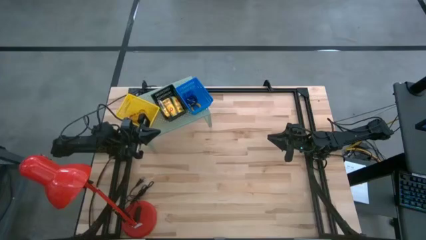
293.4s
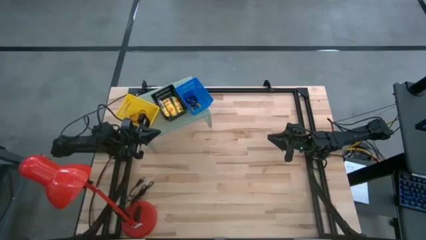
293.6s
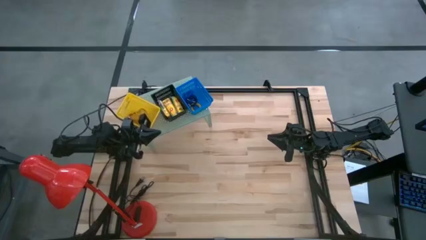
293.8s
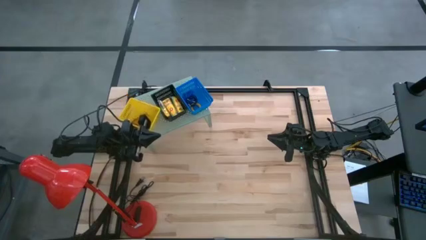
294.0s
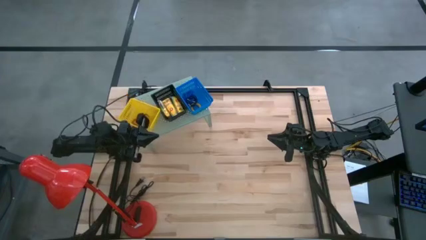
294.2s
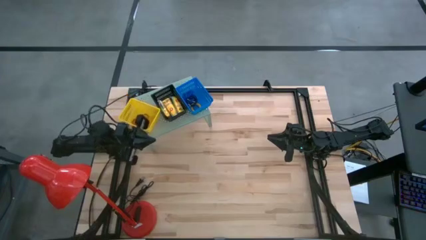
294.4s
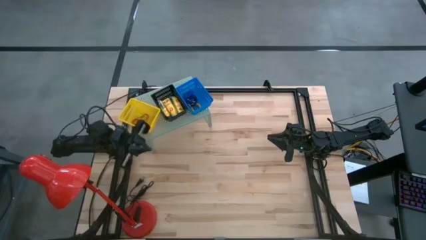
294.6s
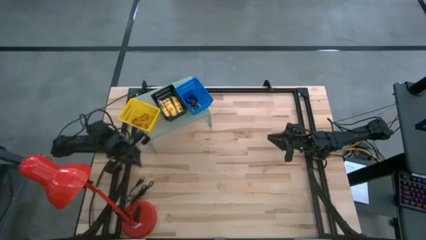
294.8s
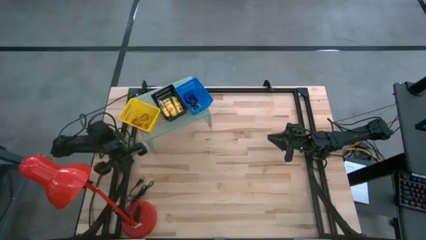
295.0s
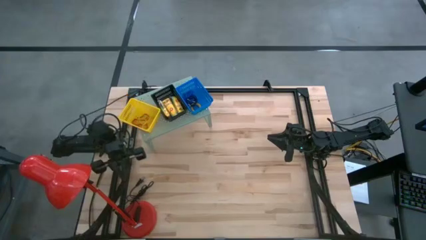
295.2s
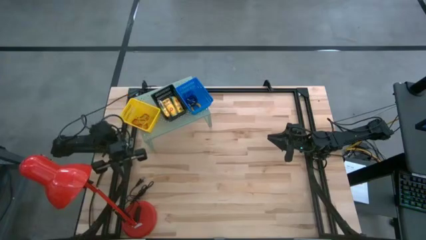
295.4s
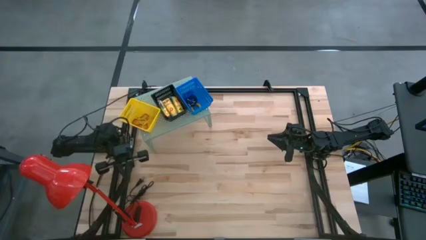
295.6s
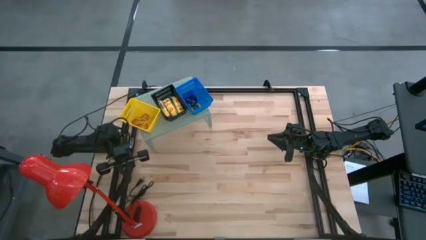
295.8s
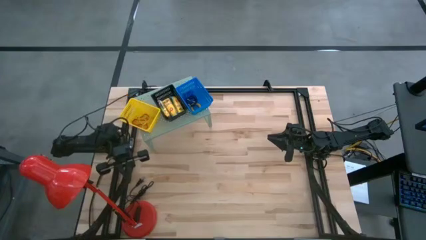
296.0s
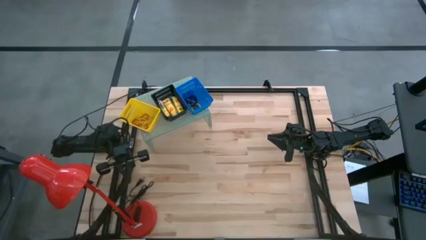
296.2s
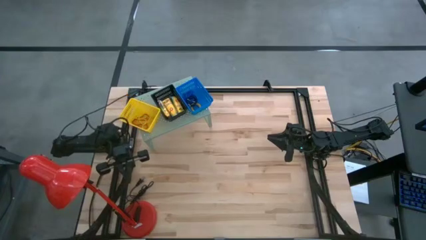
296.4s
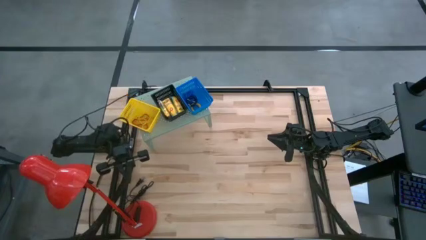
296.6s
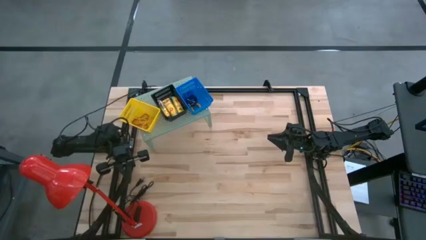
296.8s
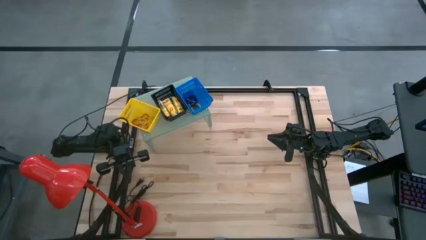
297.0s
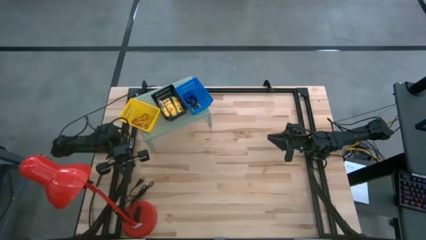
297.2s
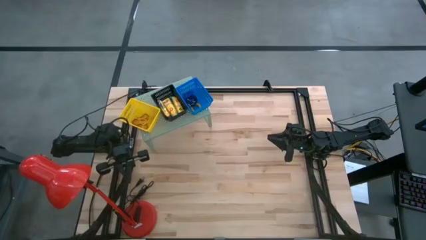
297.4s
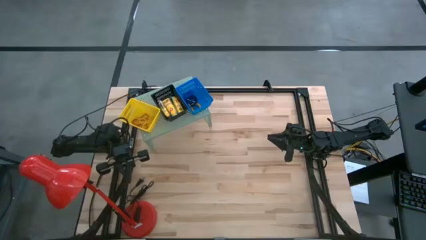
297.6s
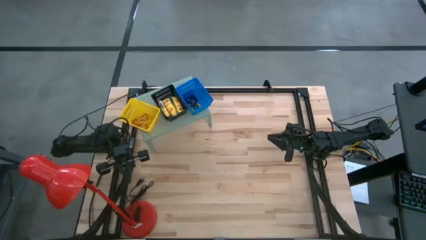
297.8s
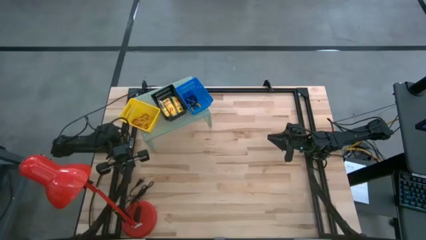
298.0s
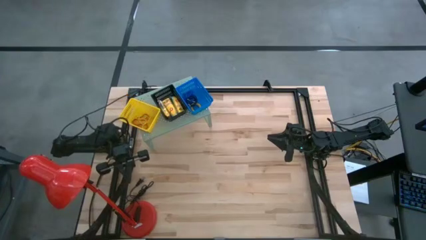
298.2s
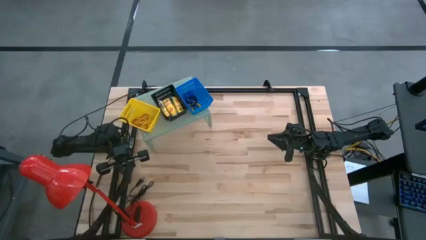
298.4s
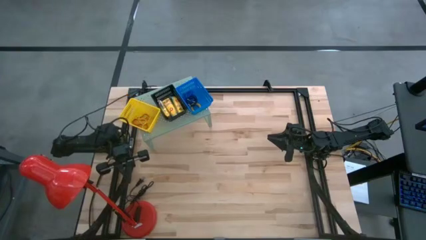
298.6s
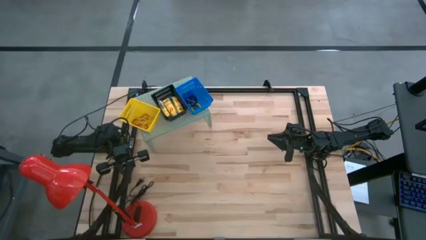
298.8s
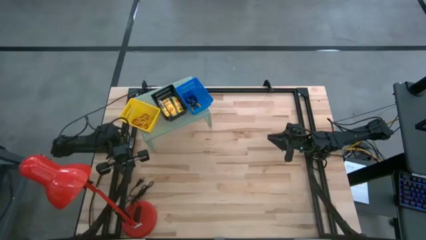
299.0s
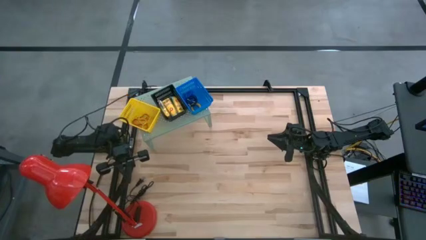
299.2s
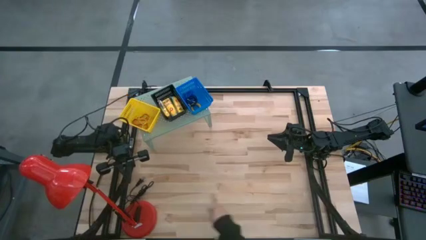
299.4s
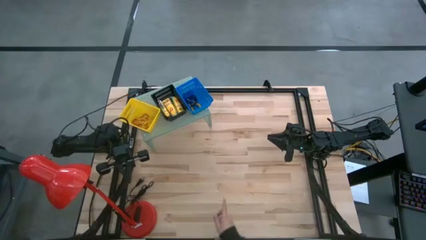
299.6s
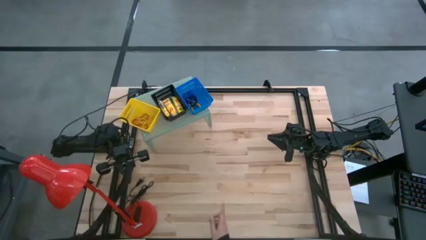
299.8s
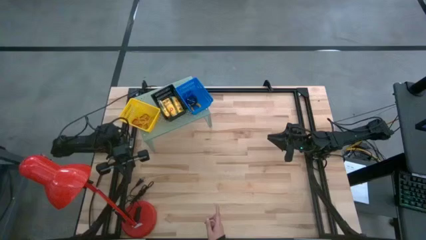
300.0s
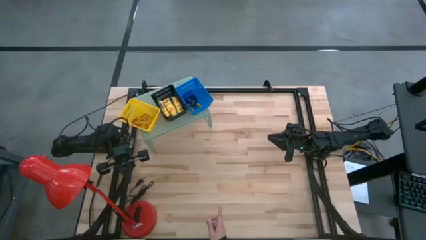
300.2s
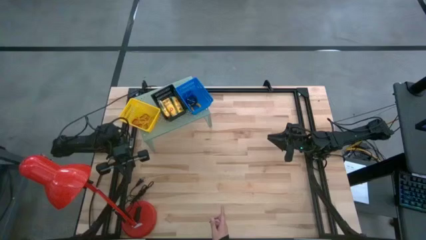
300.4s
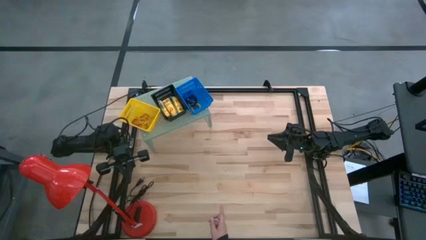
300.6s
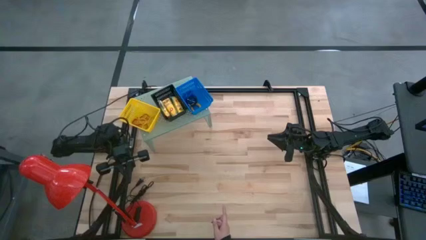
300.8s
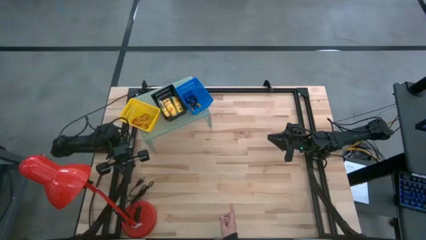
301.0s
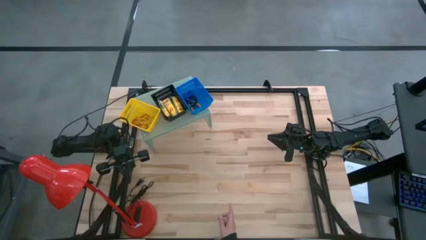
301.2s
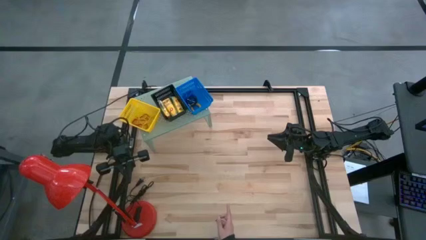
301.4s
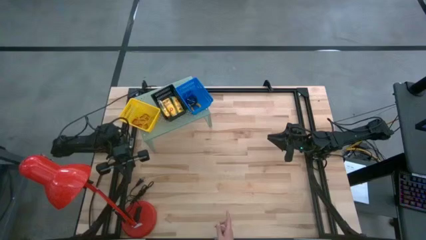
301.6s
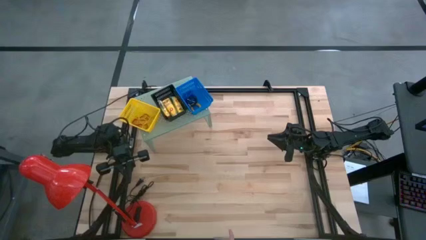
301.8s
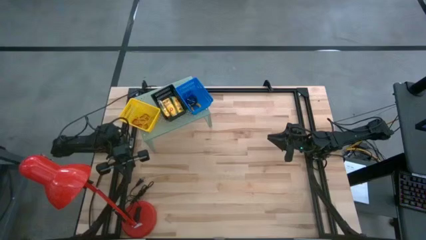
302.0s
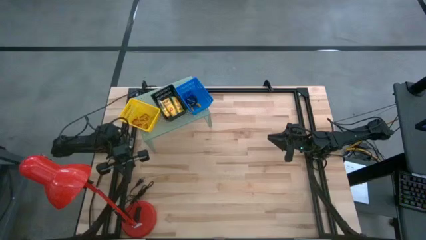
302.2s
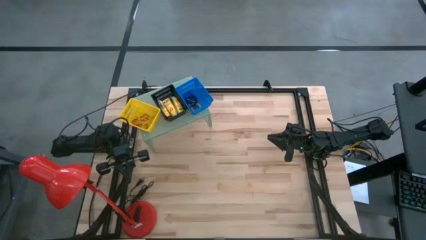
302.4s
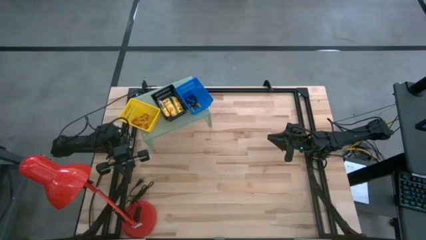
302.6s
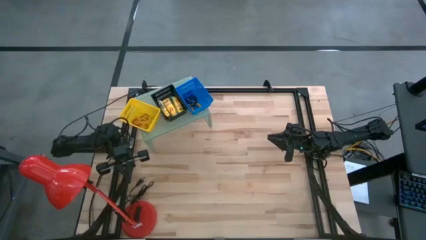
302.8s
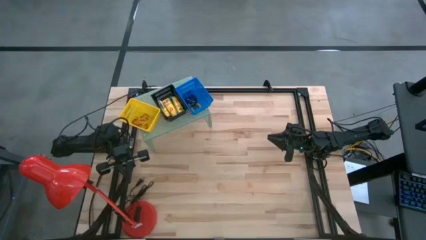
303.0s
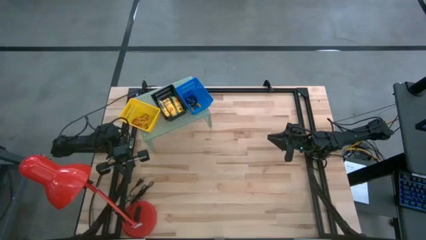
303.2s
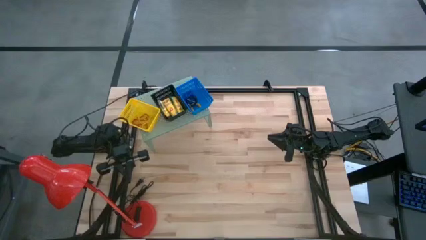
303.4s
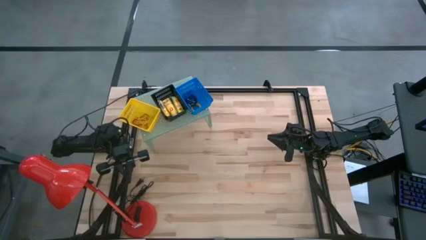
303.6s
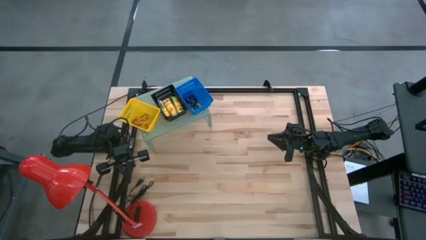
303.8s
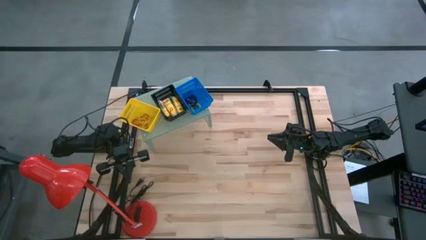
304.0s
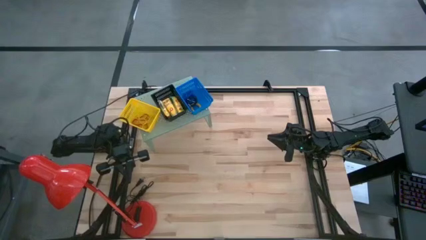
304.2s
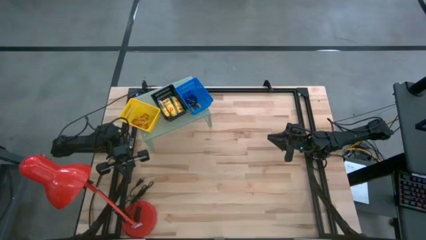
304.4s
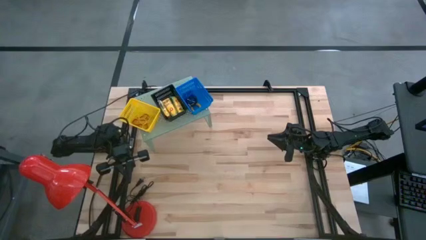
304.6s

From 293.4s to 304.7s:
Task: Pick & Place Office Desk Supplies
Return to Home Position

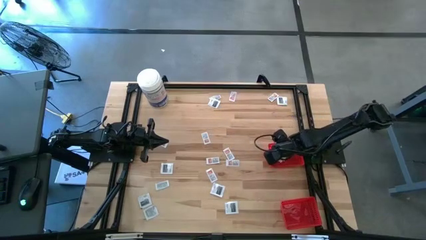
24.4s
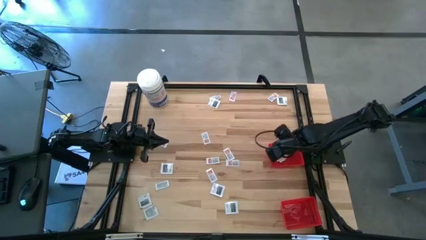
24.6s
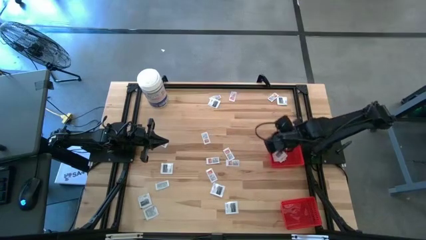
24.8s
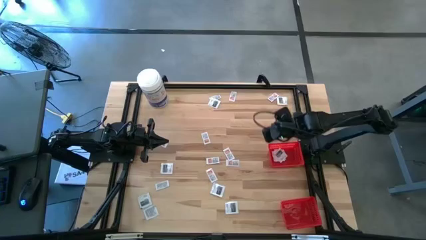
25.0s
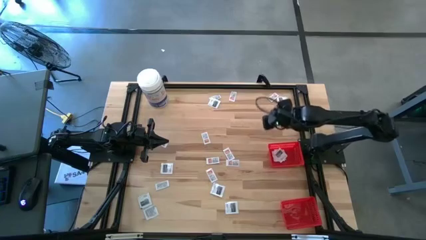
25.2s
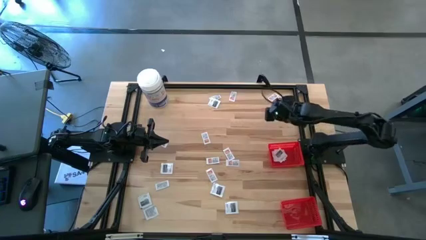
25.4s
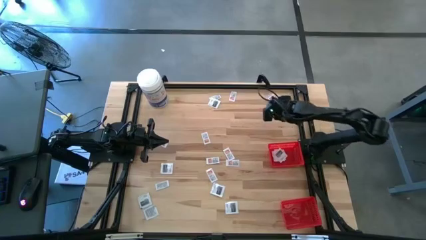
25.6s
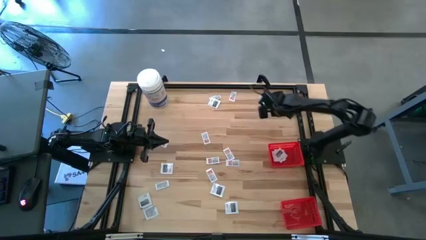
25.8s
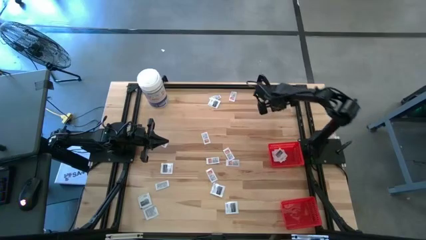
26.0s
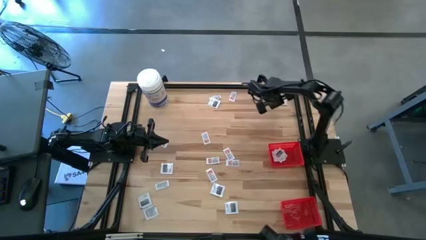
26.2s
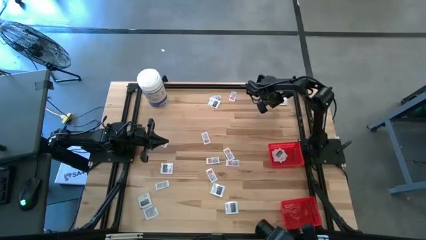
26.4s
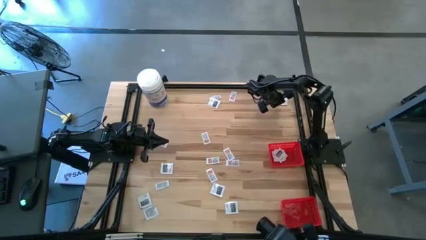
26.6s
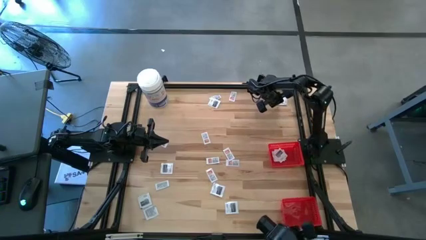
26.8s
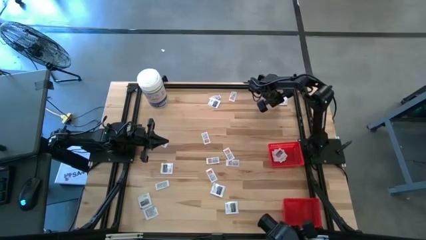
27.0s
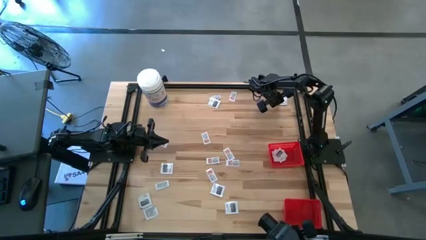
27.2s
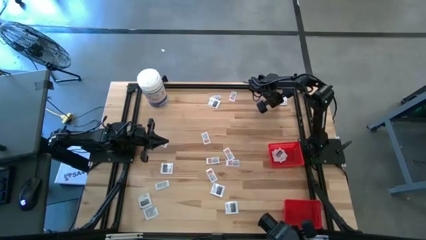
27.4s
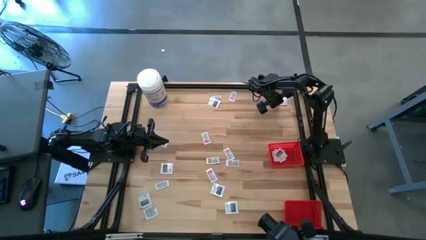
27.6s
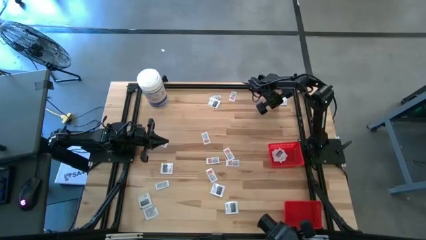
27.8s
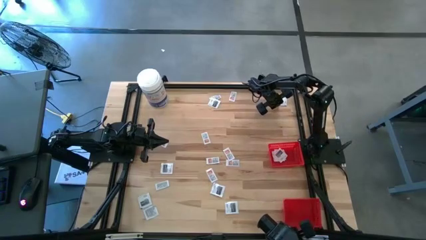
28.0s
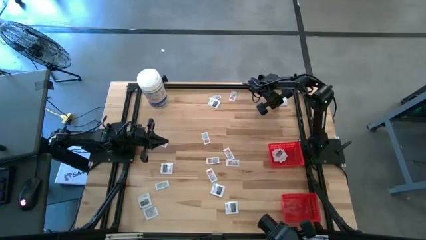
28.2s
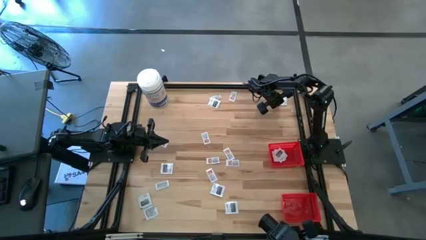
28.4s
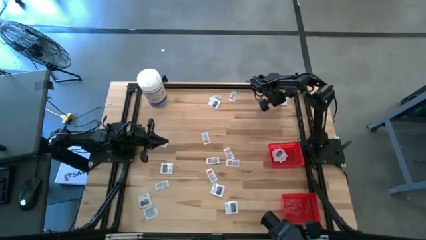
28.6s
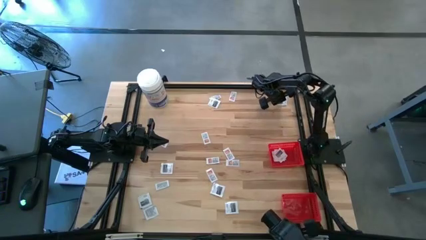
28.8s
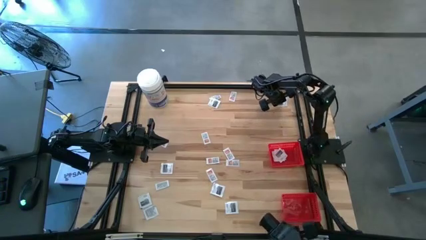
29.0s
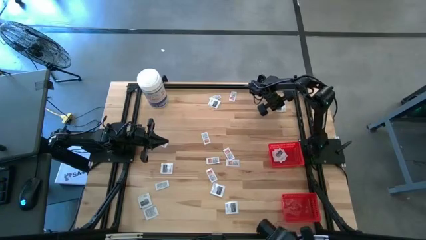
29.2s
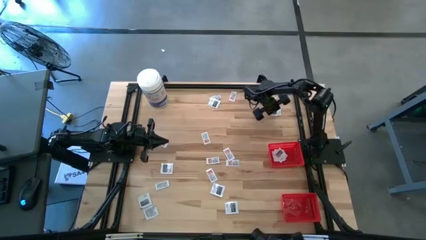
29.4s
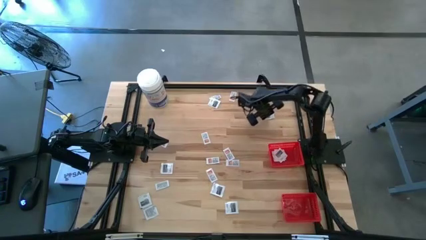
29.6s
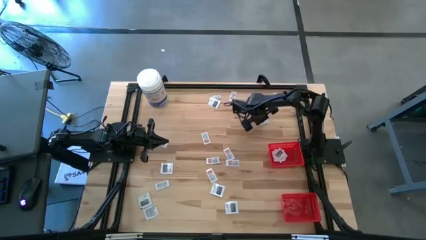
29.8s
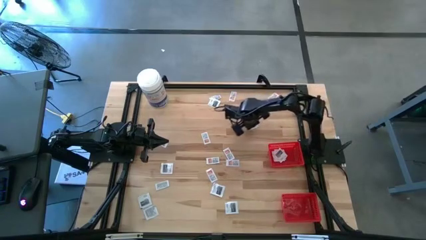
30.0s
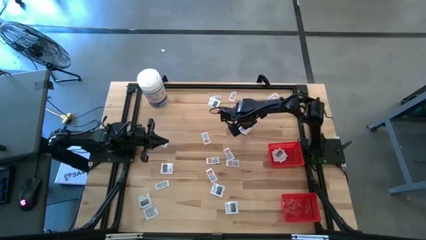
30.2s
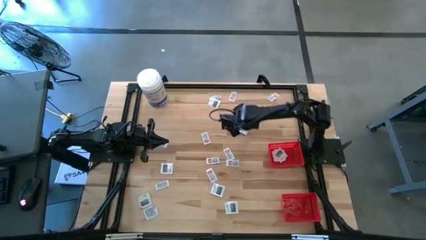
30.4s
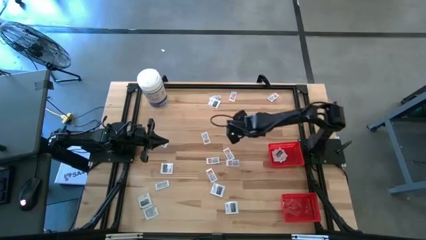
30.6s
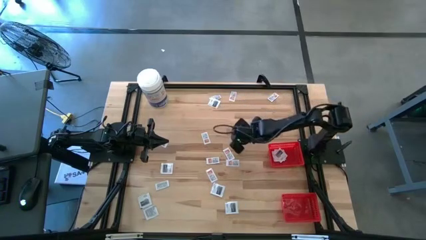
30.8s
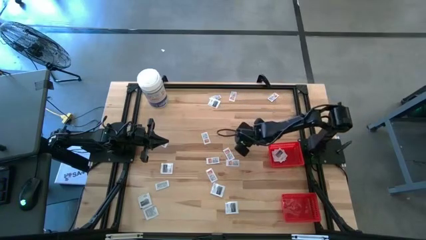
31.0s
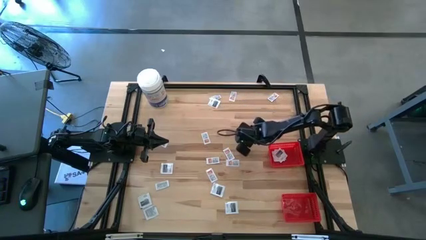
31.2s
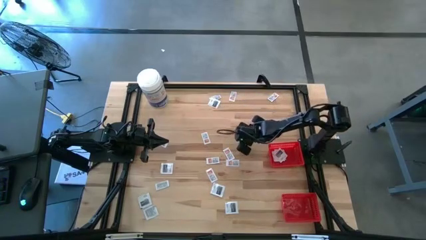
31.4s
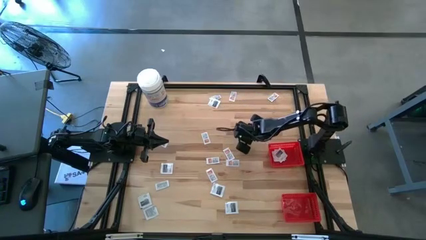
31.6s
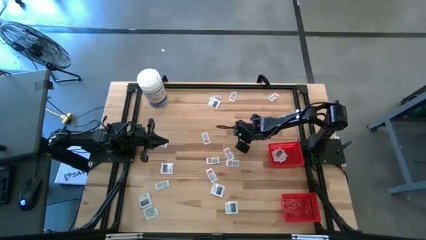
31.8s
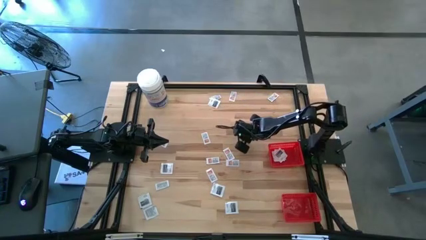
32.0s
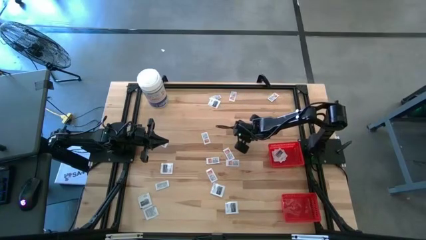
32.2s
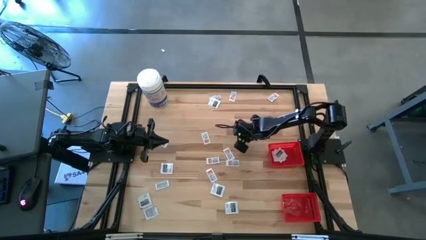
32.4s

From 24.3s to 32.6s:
Task: Pick & Place First Aid Supplies
Put the black towelette pack into the top red basket
